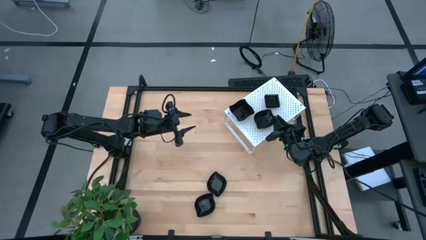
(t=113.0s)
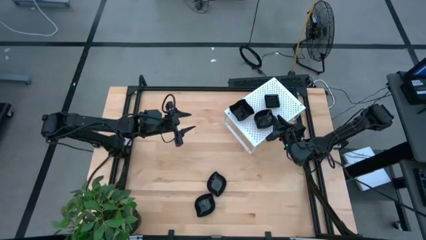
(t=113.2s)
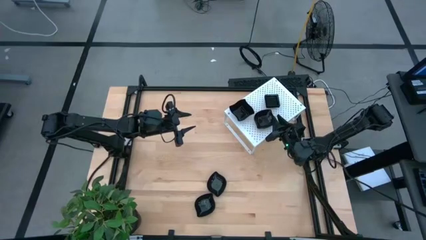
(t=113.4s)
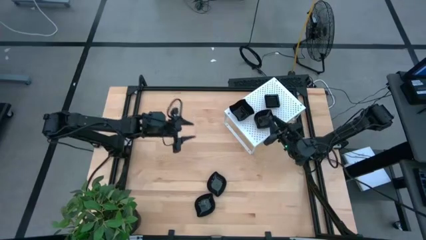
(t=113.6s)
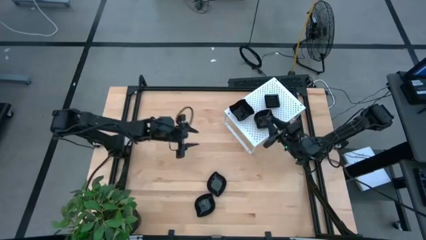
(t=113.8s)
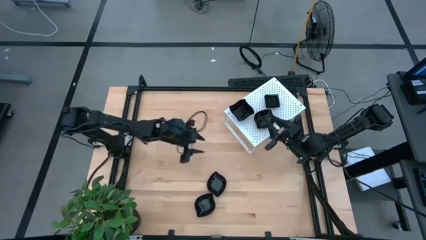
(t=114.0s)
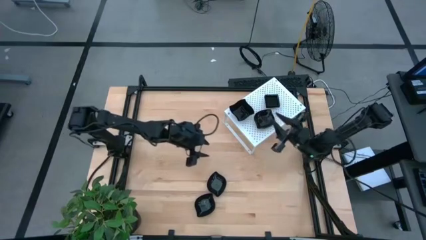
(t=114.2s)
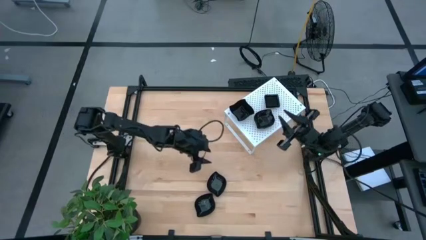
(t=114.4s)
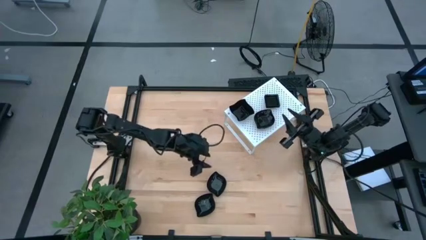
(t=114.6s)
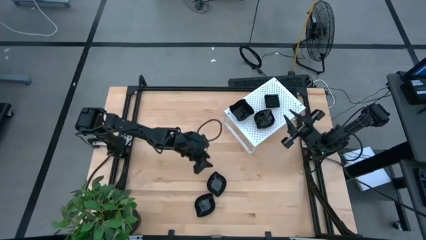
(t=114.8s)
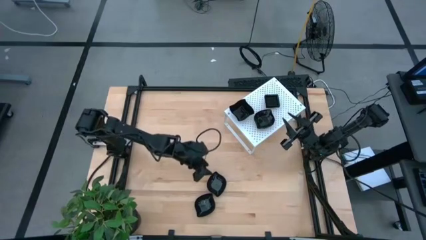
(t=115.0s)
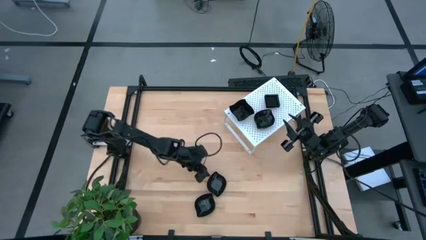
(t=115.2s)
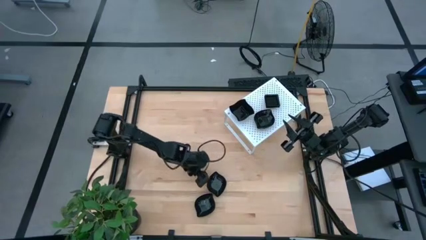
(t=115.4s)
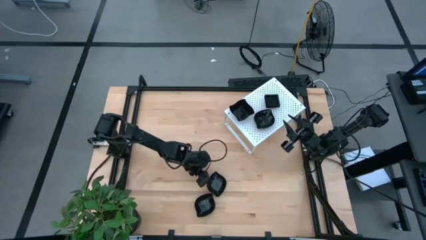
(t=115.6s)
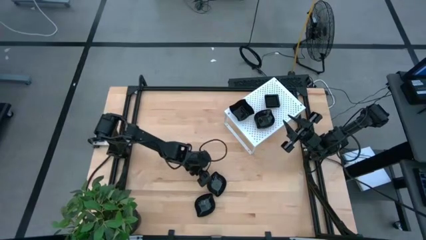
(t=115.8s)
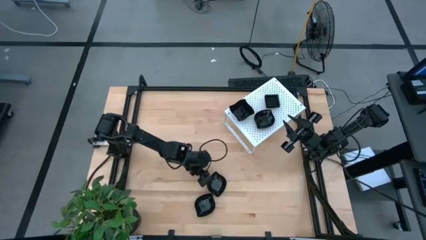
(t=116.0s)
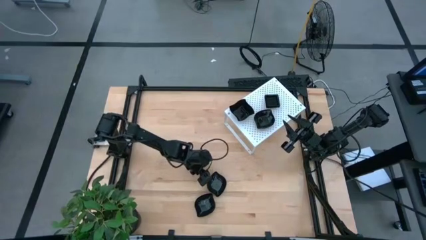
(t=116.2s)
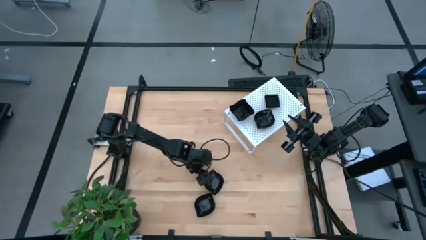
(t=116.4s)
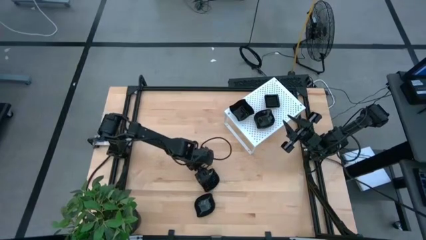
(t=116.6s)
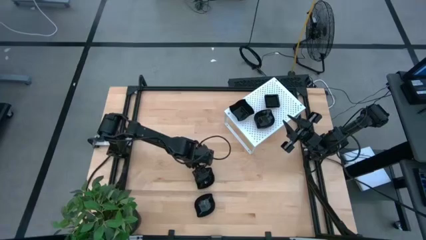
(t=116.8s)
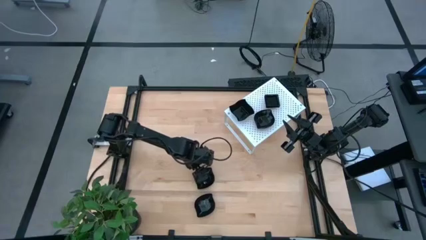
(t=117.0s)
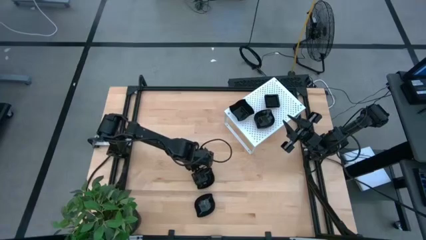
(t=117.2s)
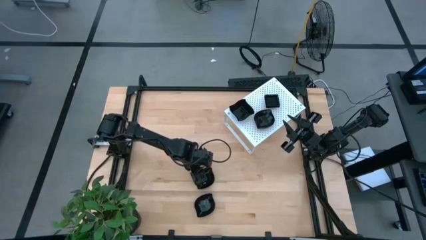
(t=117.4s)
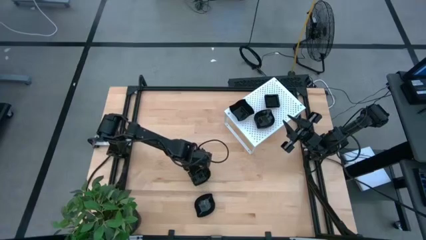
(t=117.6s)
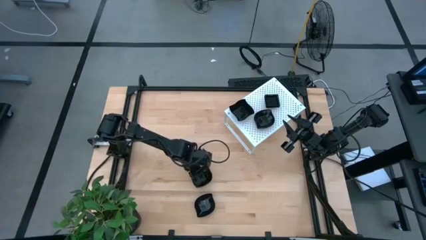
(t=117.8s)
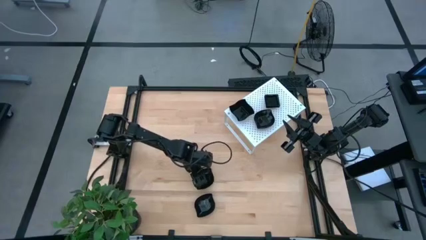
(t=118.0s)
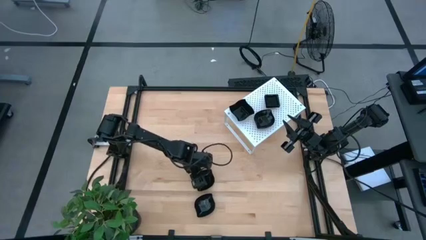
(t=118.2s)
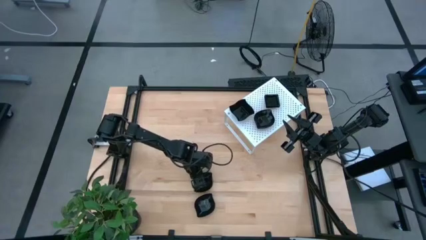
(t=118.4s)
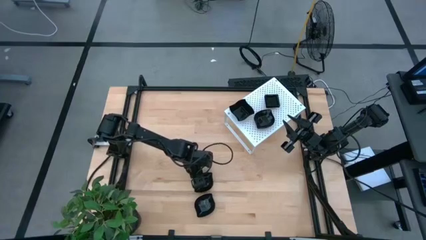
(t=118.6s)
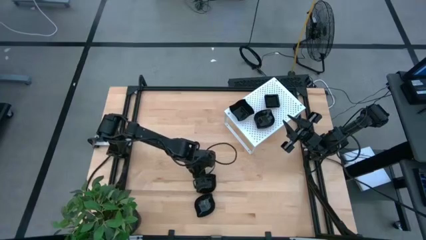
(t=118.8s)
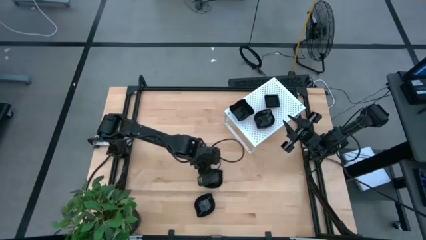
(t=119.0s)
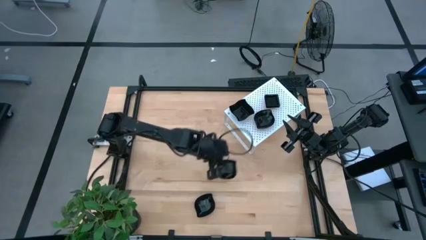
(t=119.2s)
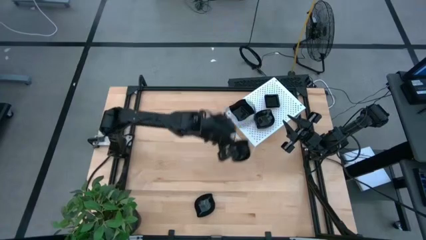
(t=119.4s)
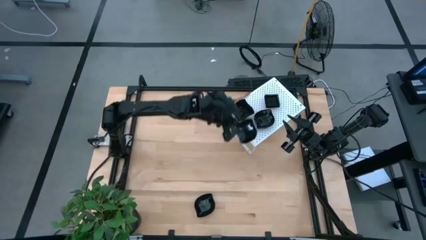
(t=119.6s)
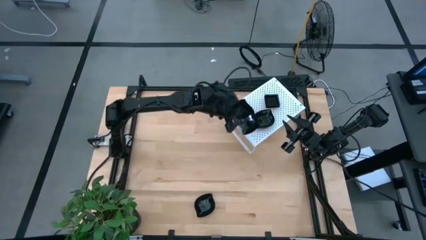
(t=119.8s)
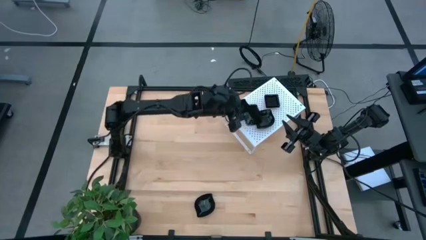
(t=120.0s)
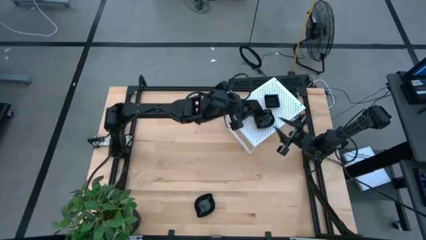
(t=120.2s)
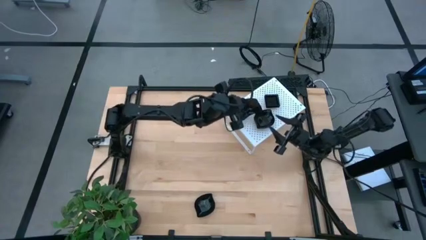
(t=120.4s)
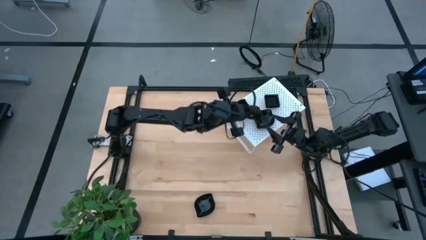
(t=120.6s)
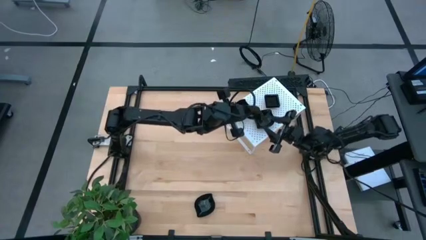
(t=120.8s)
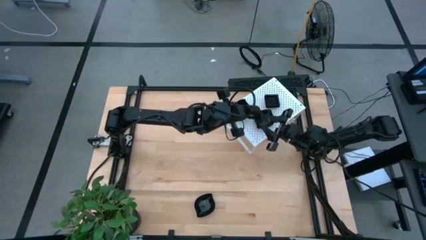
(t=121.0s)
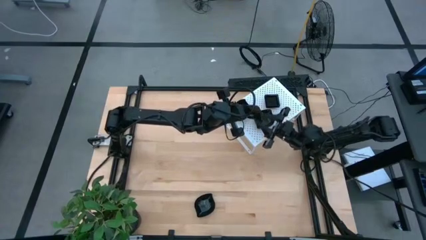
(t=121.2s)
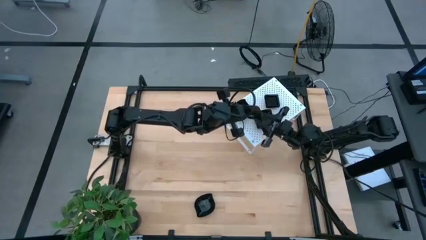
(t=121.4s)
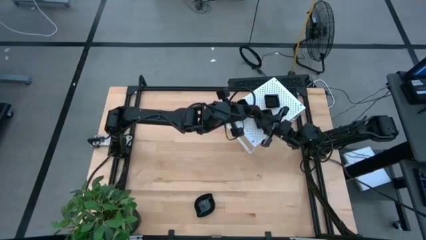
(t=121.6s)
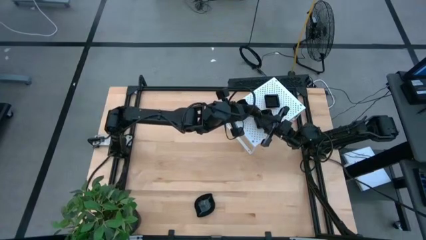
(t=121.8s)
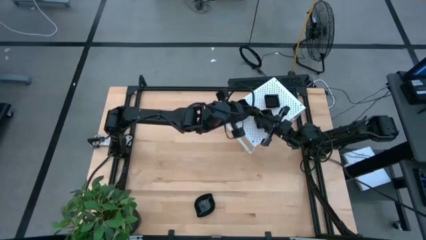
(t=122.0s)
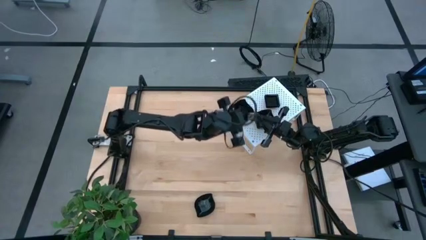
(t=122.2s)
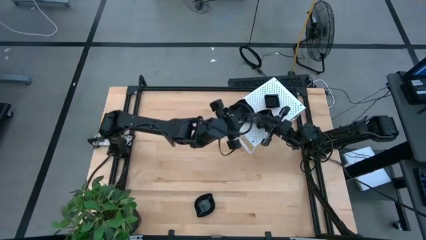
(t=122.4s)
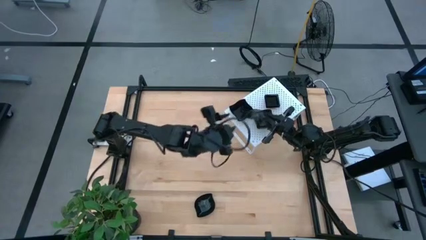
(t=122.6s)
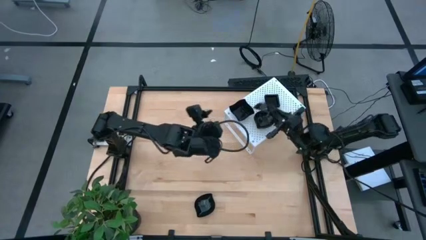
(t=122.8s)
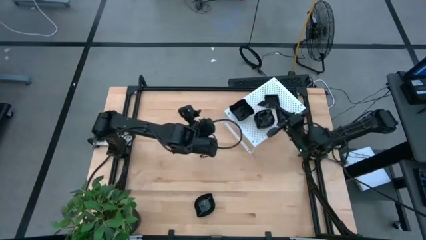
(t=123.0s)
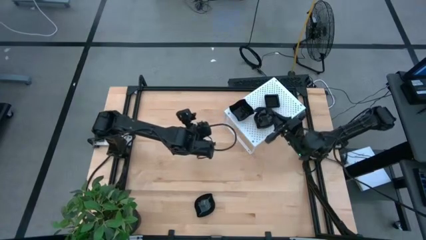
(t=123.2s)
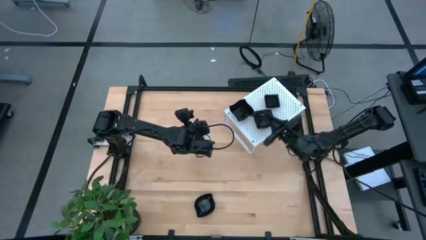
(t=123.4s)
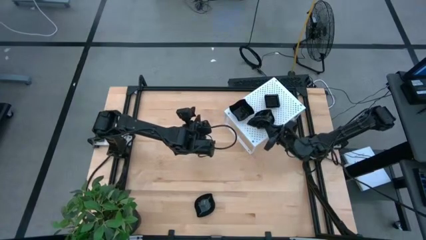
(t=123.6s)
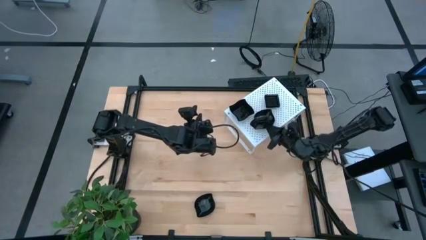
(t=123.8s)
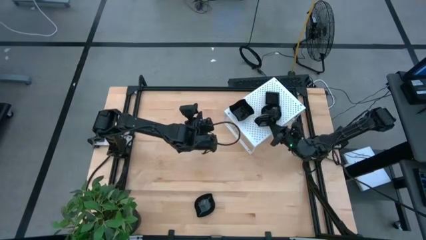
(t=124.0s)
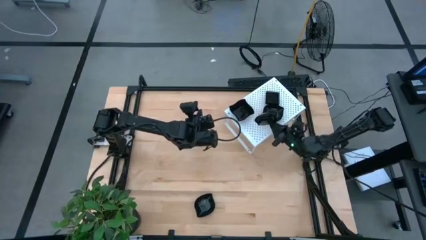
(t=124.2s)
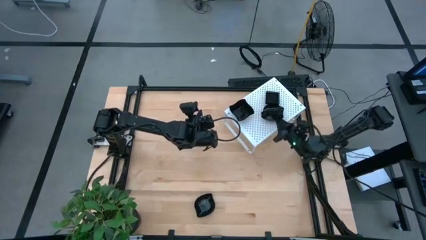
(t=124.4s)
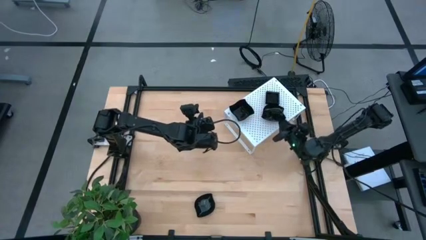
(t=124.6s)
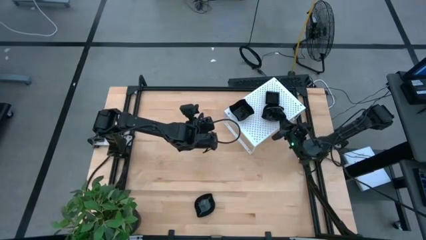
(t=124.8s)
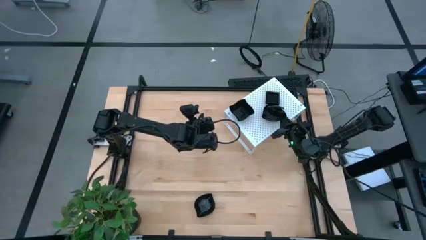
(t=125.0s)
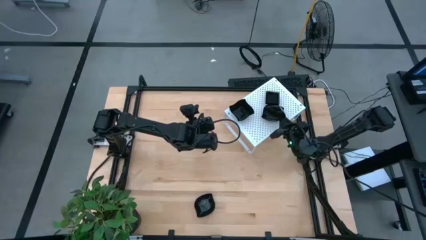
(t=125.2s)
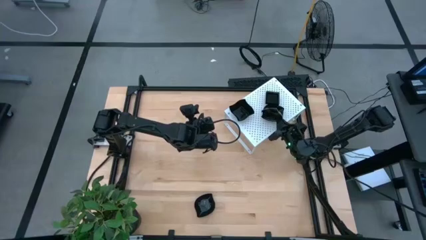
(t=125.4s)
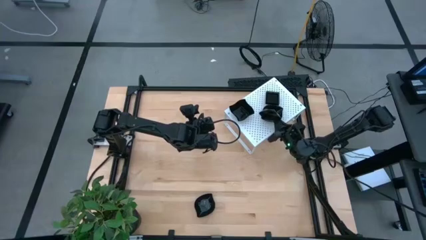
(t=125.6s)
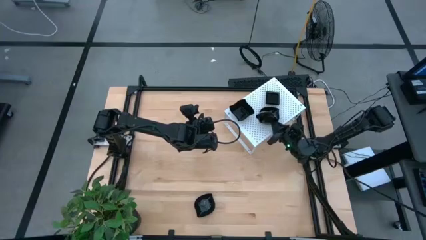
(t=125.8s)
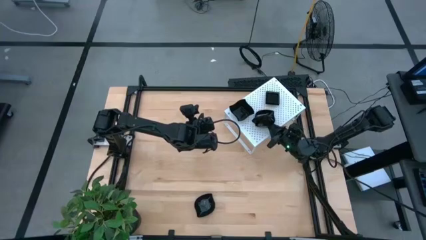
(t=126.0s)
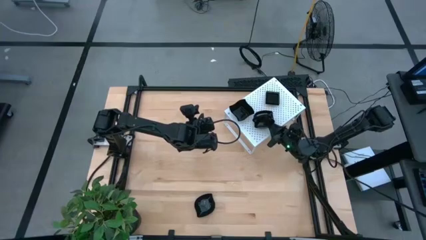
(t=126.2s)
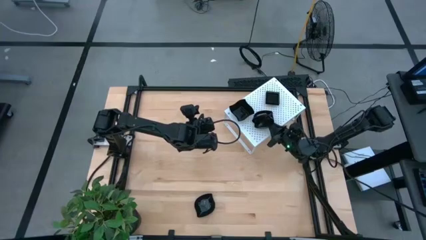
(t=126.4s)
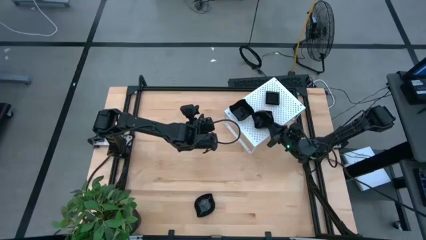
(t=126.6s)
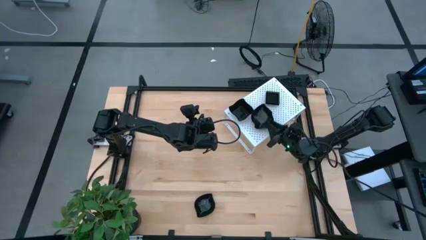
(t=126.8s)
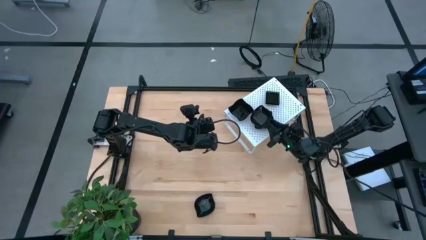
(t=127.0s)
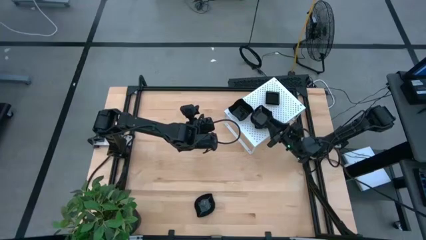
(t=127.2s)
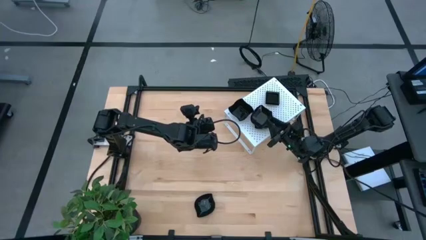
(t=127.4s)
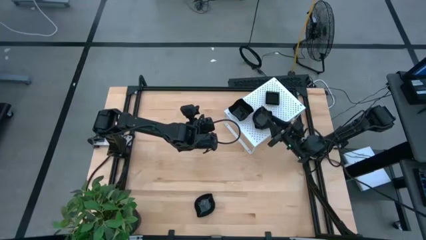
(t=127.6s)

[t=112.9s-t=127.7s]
Task: Pick & Place Mini shaped plates
Stack the black leaf shaped plate on top of the black leaf shaped plates on the shelf

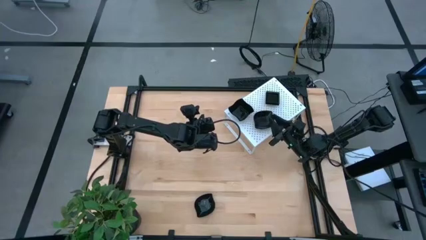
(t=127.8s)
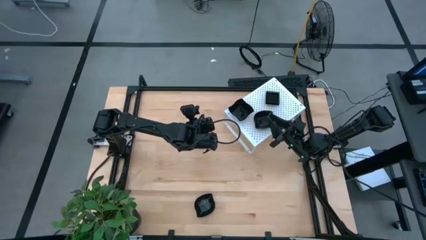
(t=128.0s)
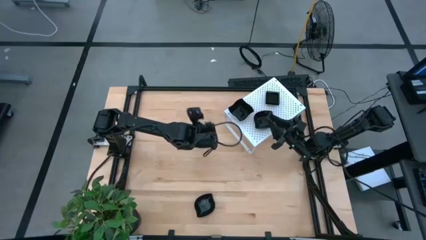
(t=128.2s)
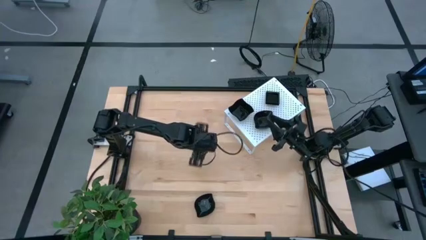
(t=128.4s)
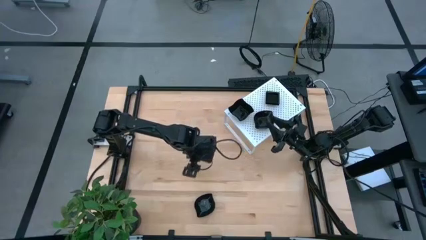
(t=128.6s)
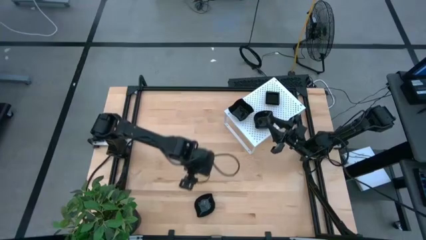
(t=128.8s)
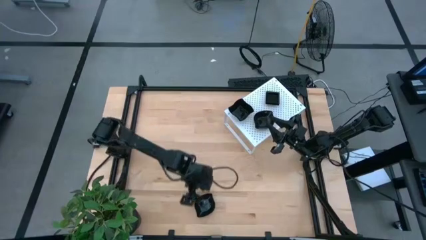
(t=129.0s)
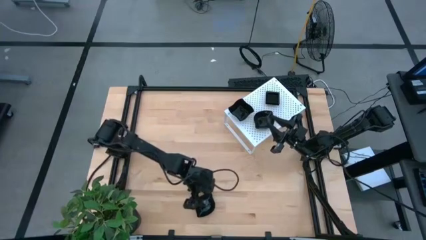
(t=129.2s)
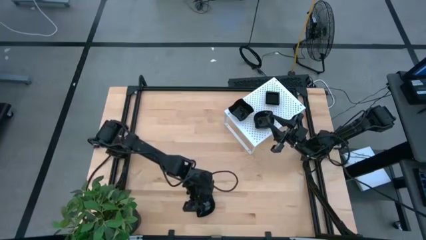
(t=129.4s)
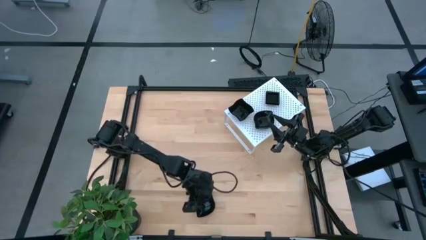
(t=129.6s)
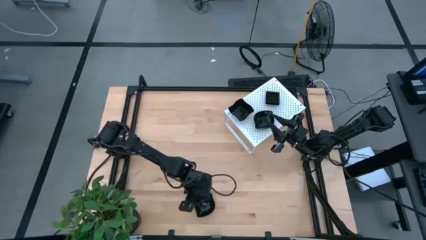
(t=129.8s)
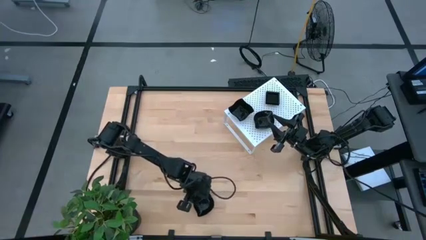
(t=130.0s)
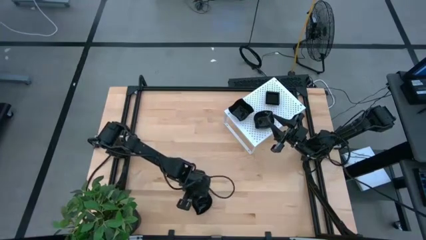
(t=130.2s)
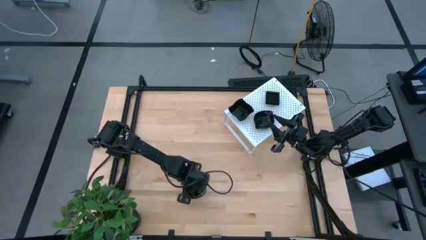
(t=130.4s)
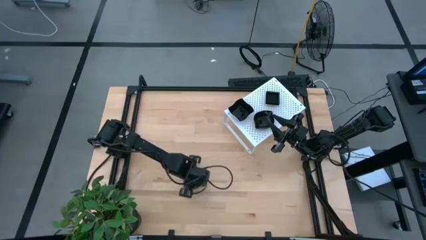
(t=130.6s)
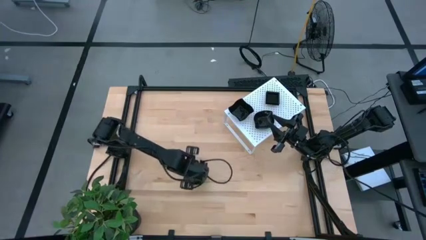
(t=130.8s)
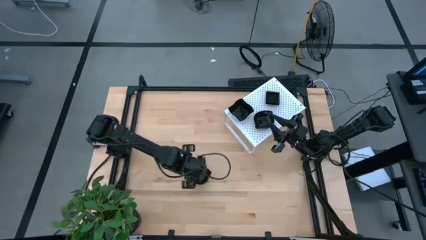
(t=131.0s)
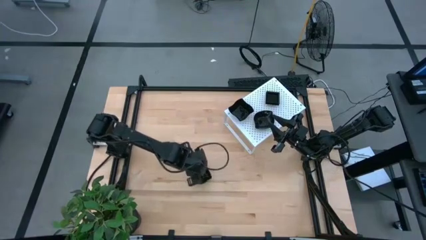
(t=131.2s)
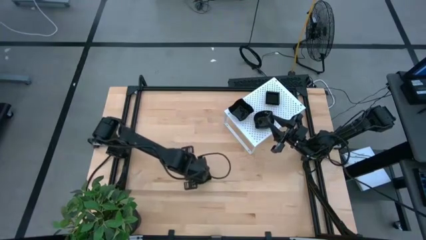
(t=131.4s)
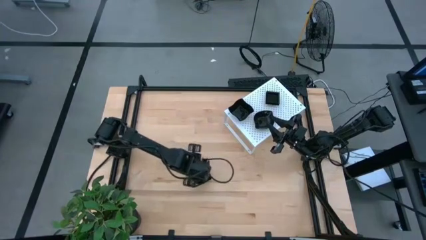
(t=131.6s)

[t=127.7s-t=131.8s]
Stack the black leaf shaped plate on top of the black leaf shaped plates on the shelf
